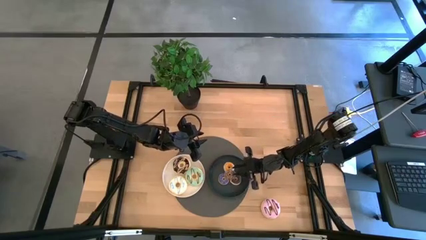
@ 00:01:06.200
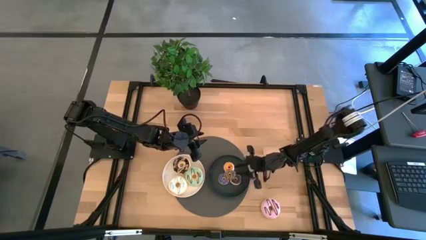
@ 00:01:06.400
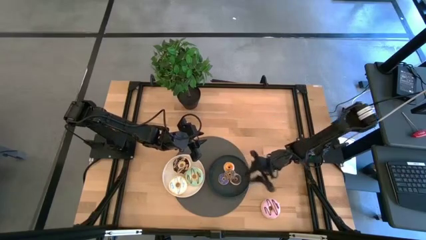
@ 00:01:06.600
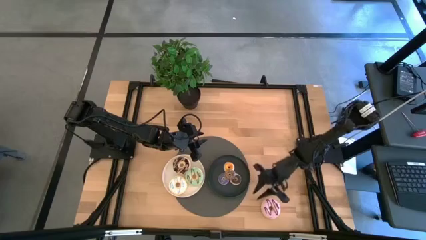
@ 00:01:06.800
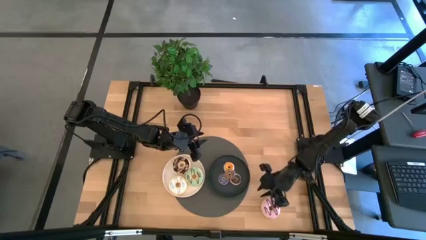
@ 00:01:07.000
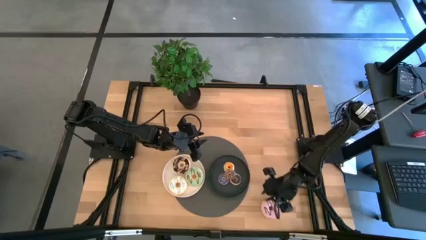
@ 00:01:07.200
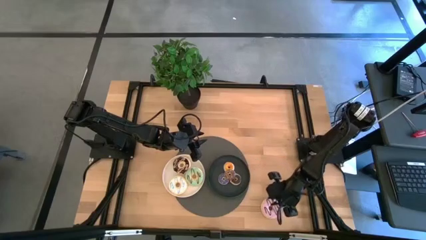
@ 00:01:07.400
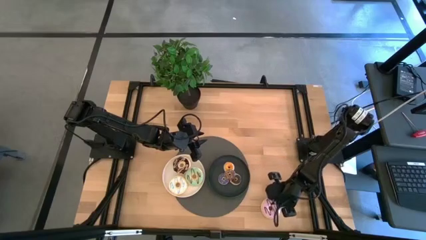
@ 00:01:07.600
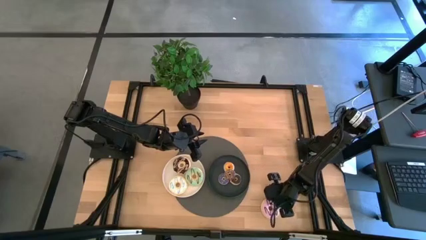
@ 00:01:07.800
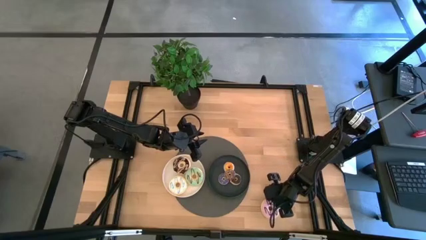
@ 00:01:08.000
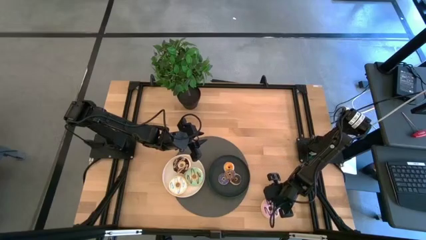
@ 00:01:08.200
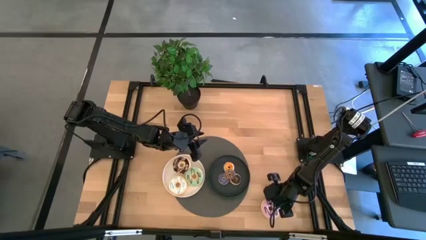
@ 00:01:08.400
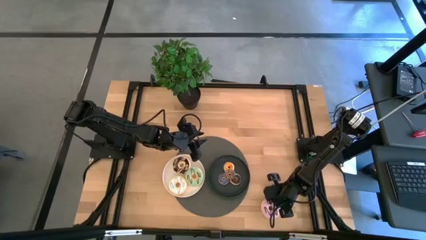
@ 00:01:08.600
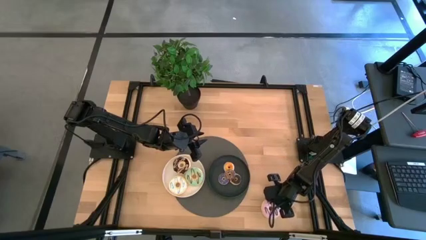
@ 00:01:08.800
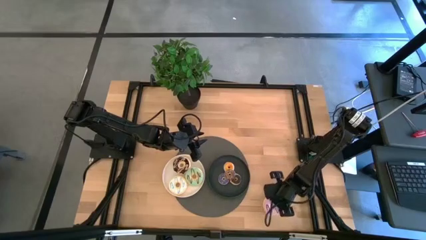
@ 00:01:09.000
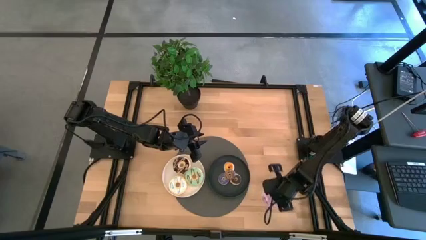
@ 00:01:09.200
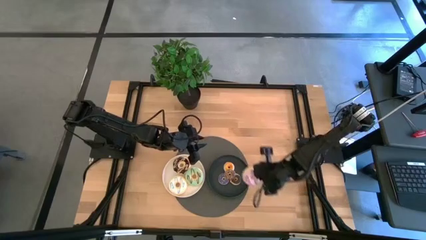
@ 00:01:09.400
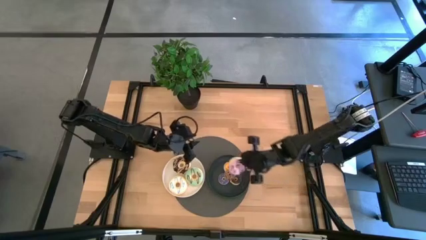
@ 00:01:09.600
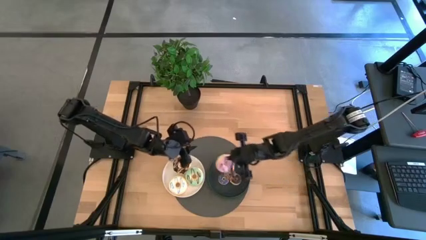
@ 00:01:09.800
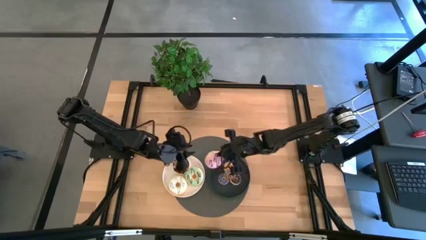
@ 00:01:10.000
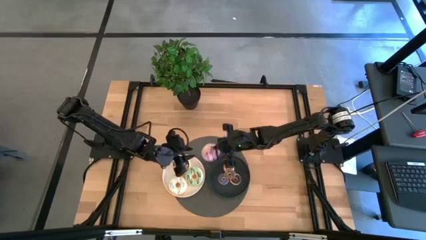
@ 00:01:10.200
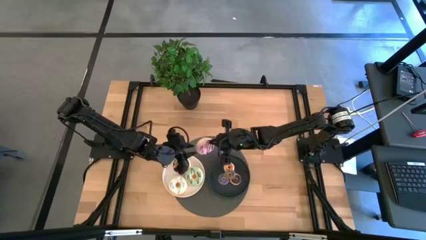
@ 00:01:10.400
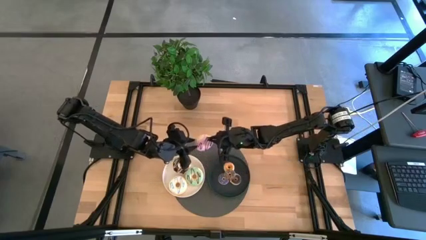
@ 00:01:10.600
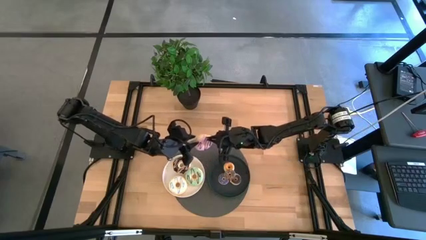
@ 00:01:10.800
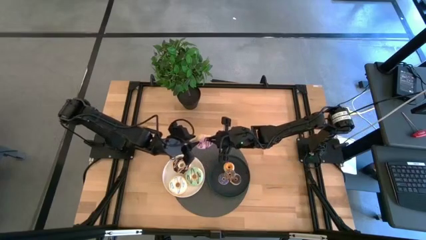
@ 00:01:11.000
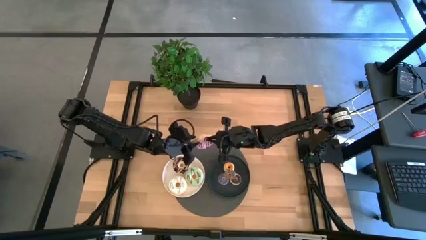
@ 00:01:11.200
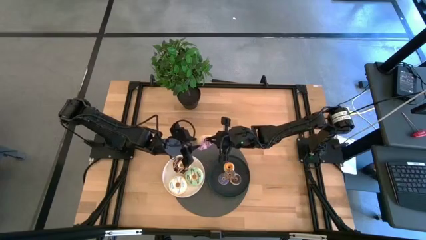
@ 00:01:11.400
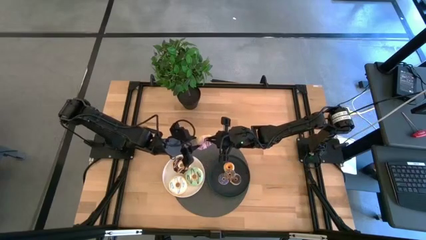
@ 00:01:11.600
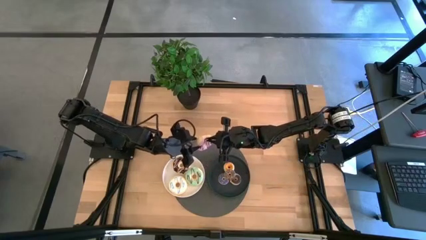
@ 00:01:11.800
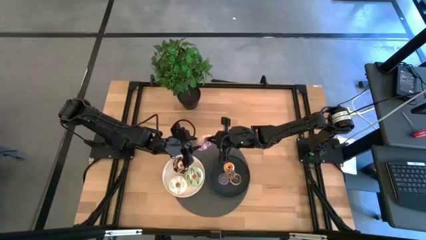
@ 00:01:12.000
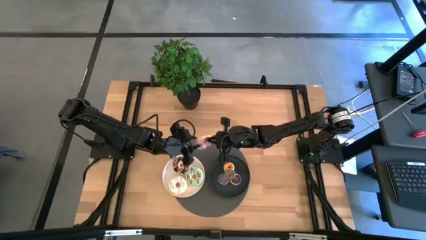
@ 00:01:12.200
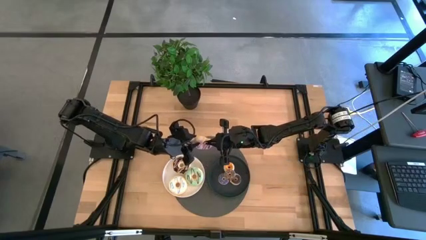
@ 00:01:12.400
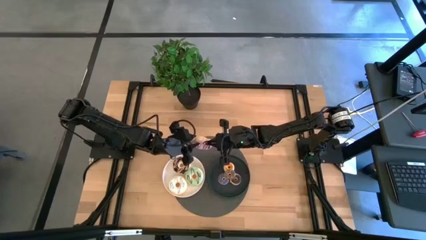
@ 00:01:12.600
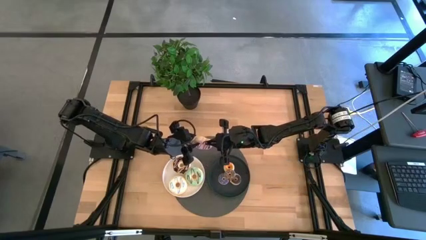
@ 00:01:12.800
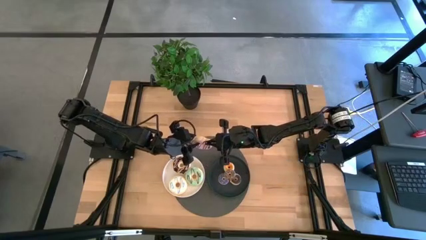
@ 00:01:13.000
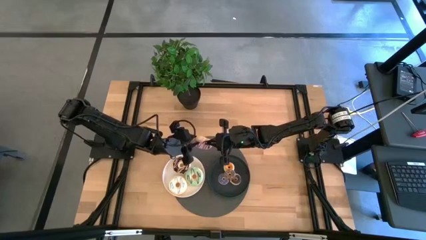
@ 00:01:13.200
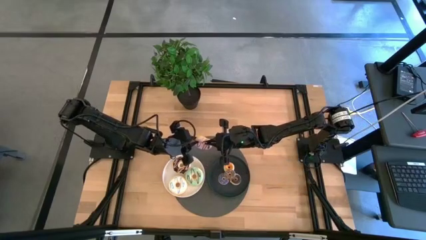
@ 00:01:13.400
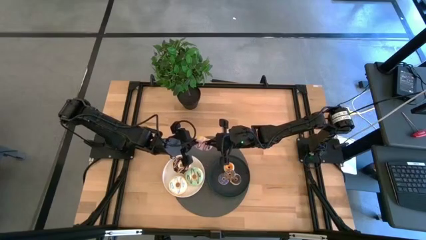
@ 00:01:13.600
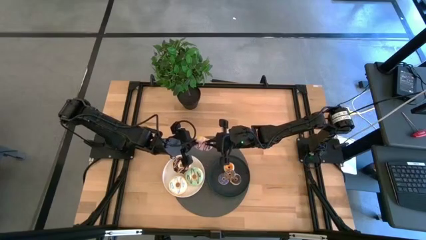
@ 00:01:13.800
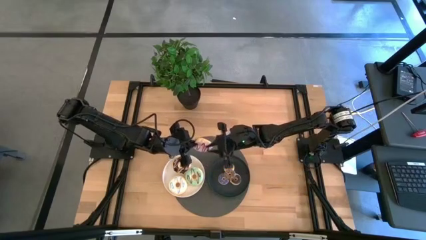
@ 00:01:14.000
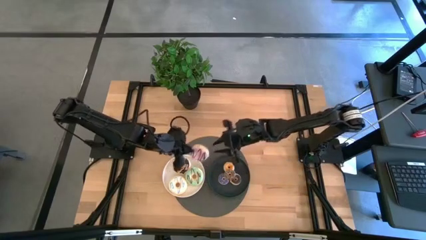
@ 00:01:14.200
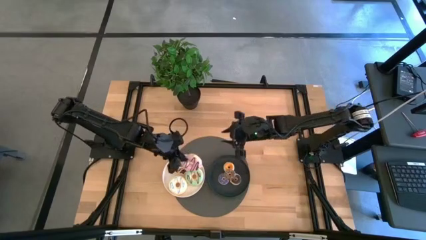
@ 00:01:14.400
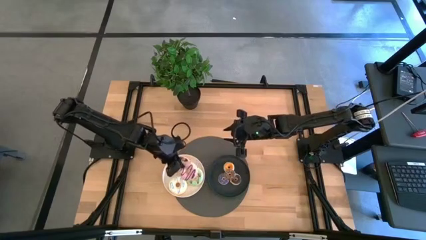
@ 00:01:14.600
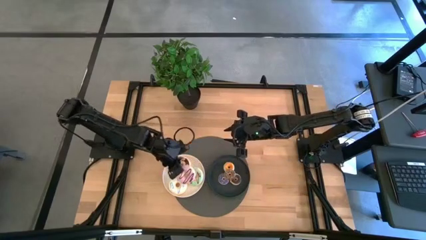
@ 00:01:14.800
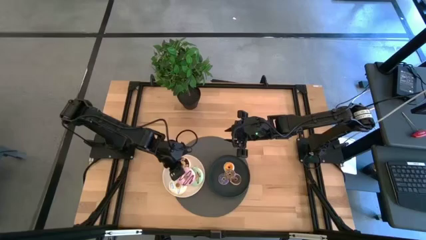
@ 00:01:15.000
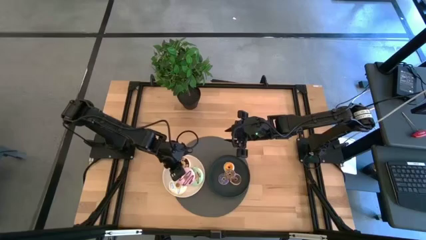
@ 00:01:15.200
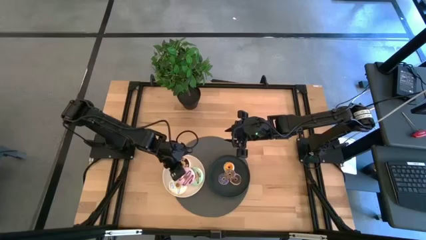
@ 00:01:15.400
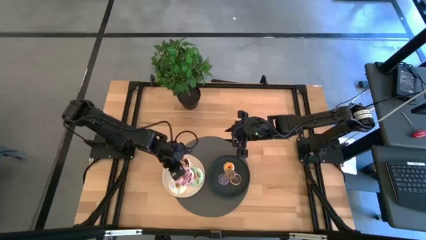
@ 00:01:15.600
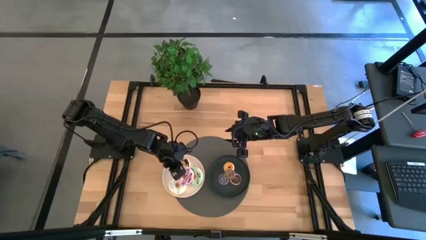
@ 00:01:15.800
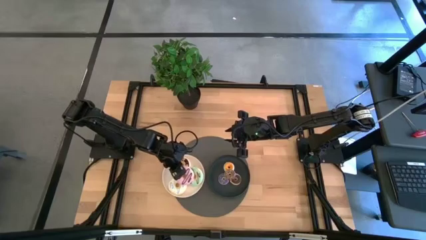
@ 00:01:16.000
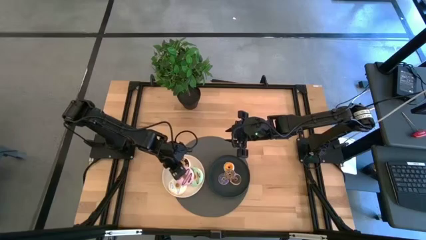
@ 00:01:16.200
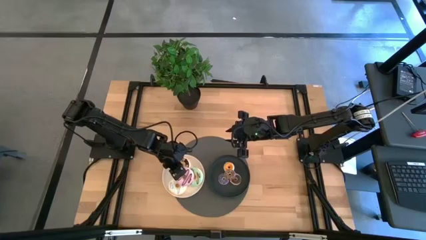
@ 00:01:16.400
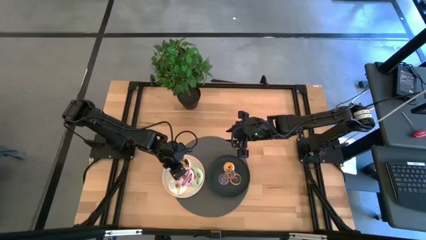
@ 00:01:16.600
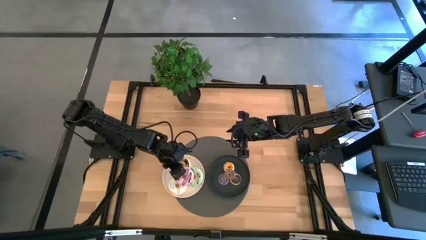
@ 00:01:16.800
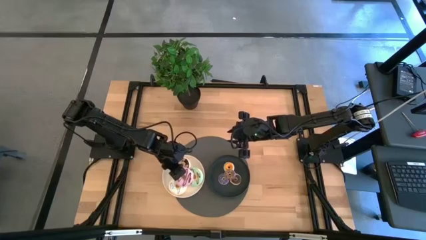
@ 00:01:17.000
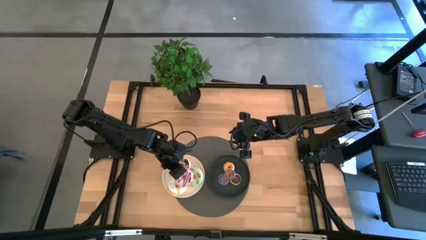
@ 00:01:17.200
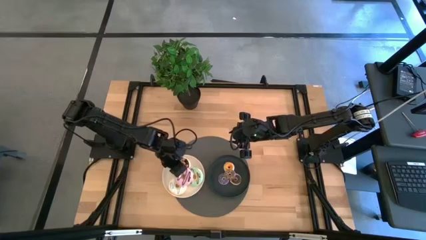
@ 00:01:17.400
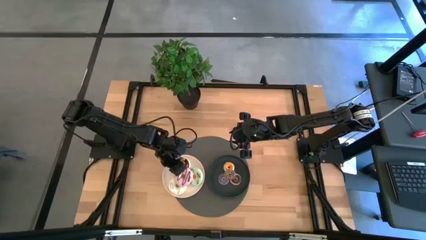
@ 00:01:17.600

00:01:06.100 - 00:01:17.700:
Task: Pick & Place donuts
Put the large purple donut on the white plate

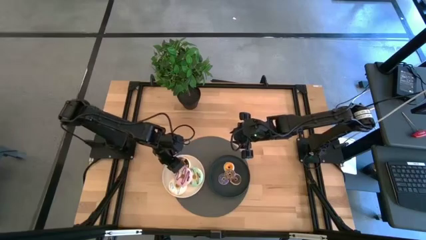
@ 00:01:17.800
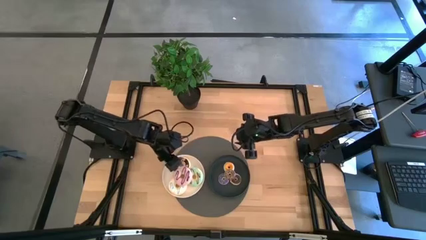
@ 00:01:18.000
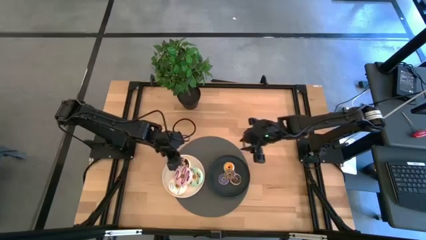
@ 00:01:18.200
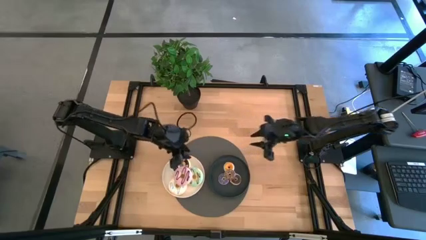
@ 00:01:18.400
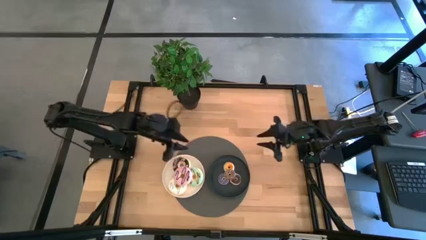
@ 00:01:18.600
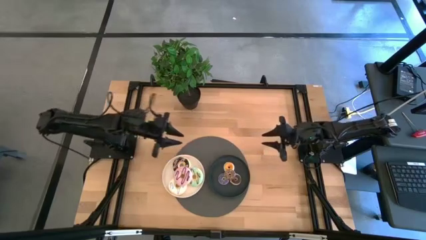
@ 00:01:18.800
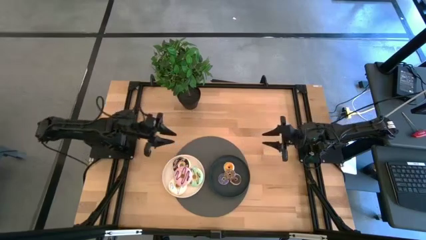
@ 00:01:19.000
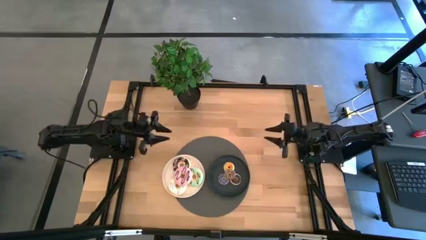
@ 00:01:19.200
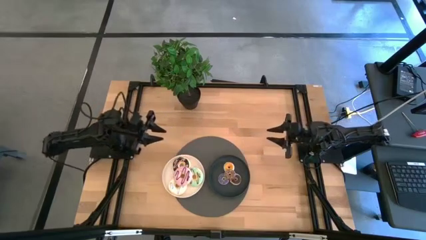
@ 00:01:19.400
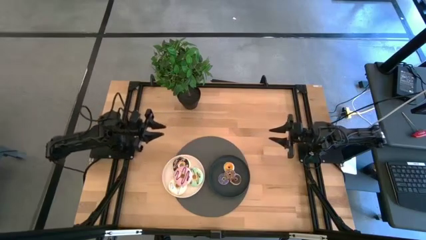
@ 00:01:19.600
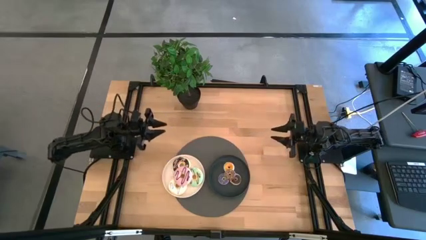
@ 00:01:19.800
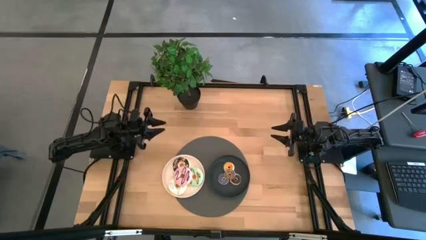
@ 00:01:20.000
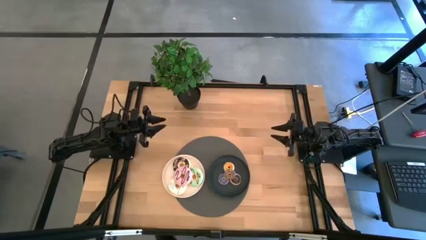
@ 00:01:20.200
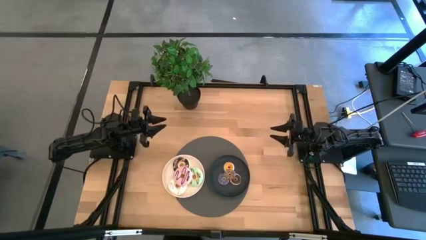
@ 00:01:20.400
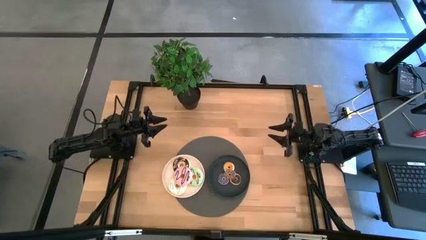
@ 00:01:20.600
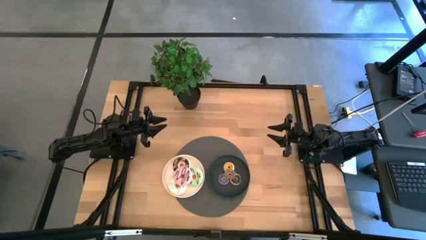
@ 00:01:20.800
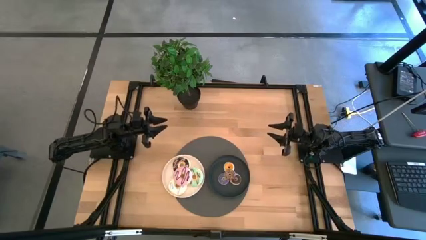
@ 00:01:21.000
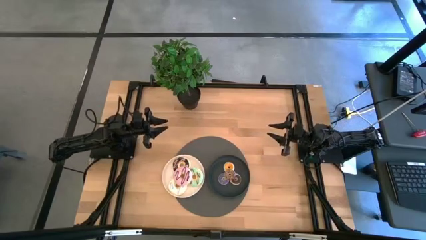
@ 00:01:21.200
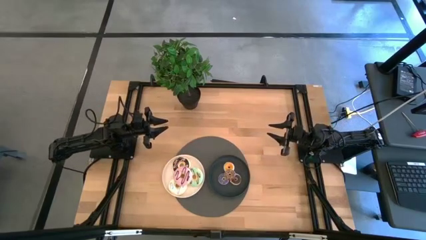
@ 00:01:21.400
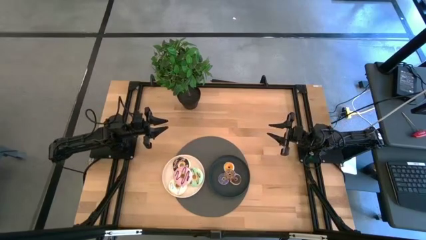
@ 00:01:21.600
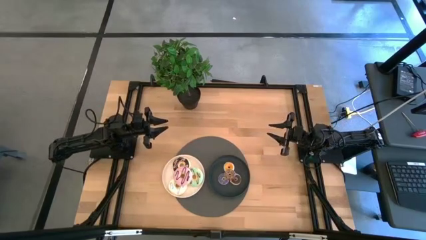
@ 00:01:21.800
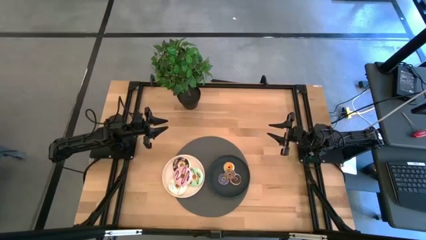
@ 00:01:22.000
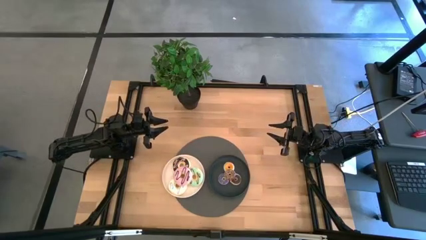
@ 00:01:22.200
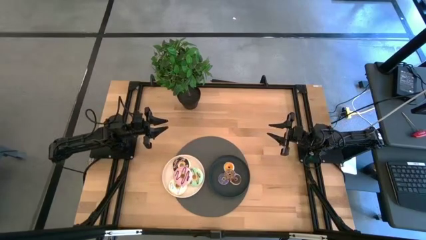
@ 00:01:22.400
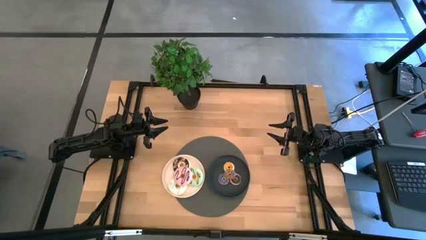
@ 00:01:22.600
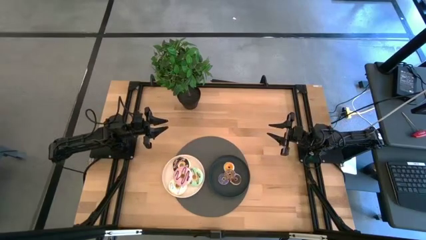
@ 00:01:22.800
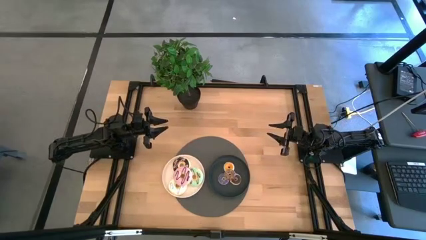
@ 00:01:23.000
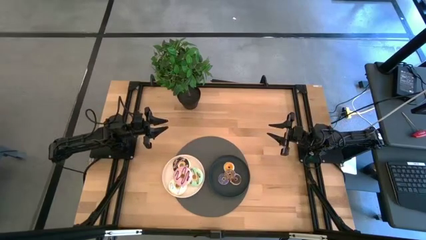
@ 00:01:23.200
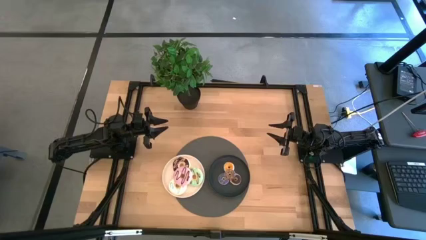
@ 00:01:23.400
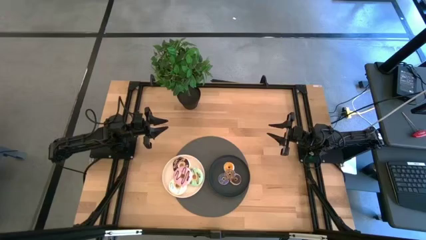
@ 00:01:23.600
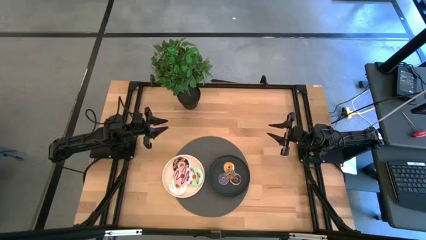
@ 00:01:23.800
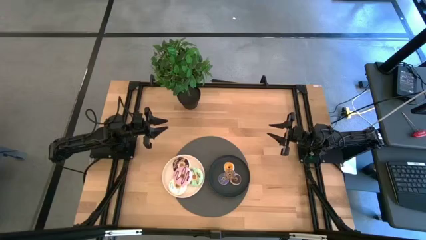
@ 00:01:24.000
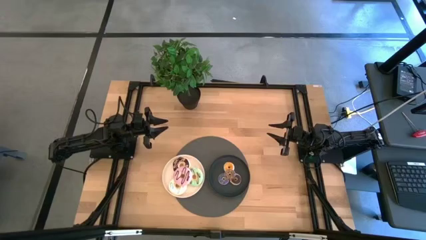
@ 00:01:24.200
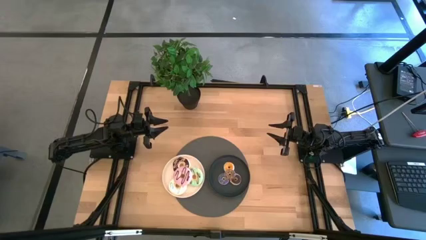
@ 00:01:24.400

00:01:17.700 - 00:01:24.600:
Return to Home Position
